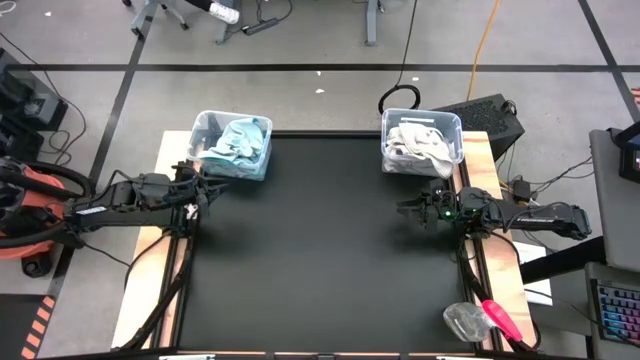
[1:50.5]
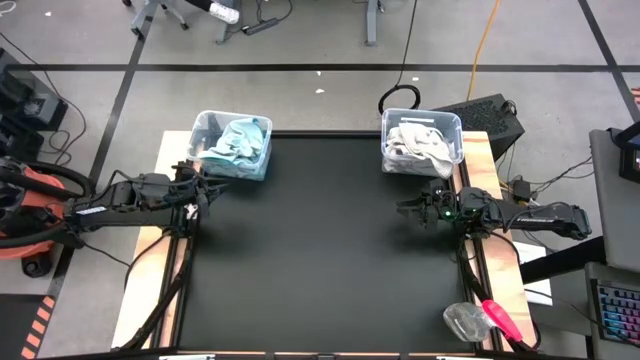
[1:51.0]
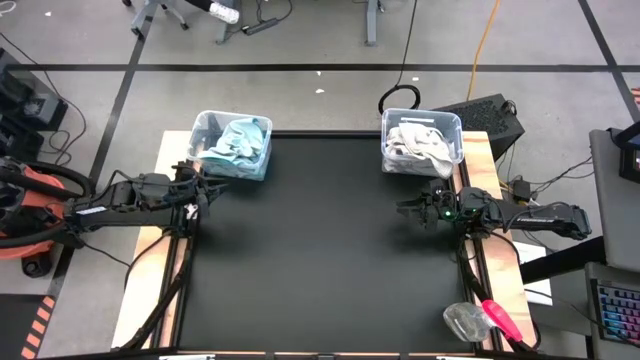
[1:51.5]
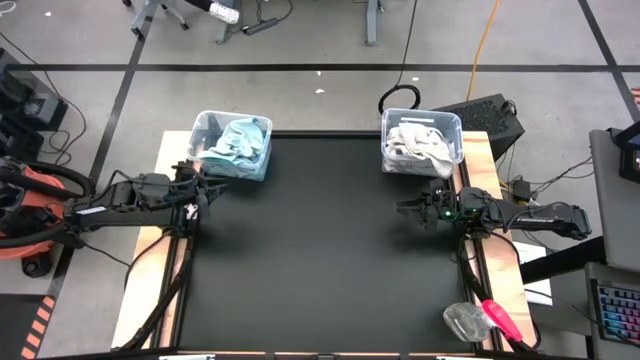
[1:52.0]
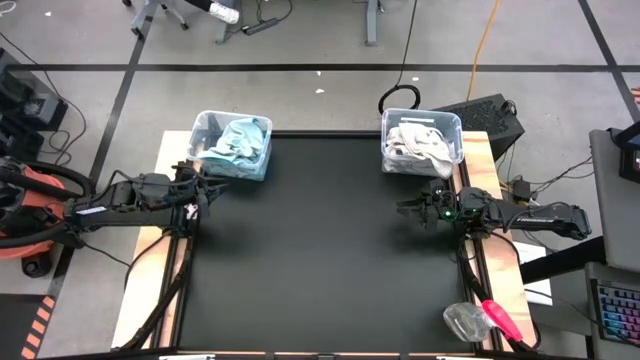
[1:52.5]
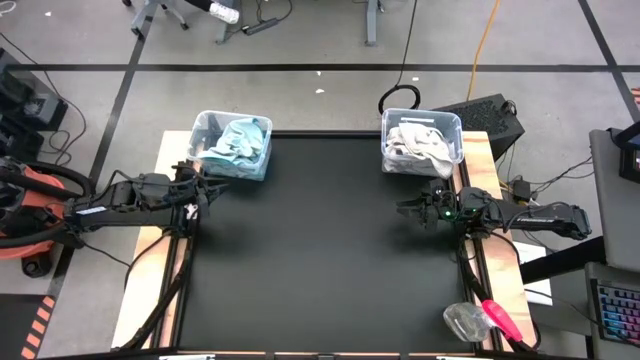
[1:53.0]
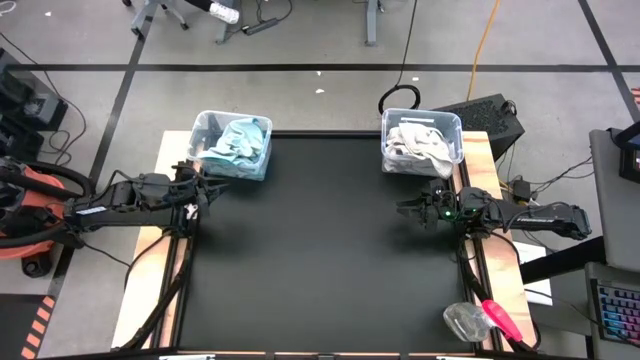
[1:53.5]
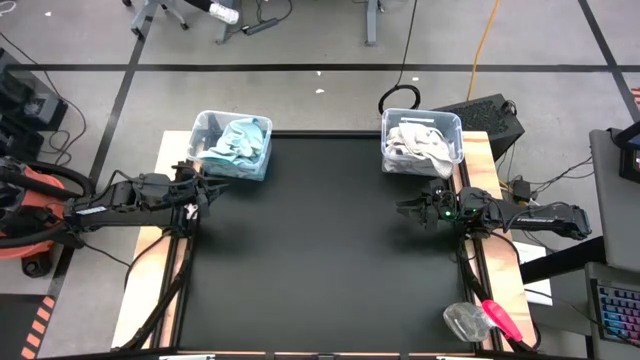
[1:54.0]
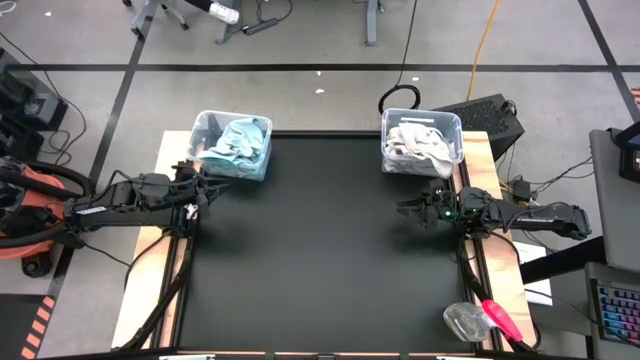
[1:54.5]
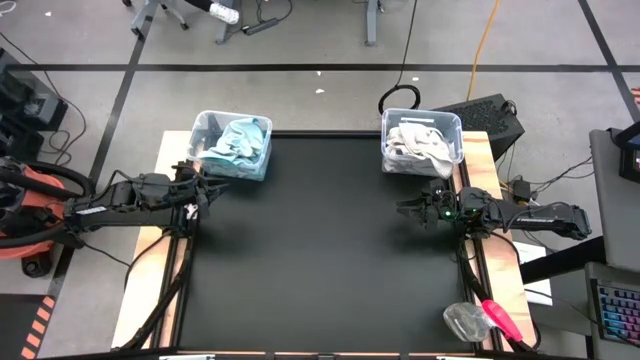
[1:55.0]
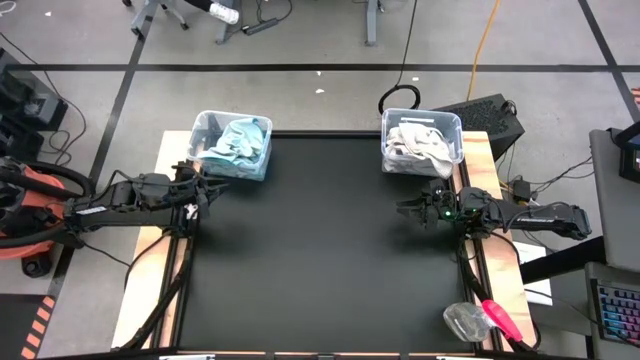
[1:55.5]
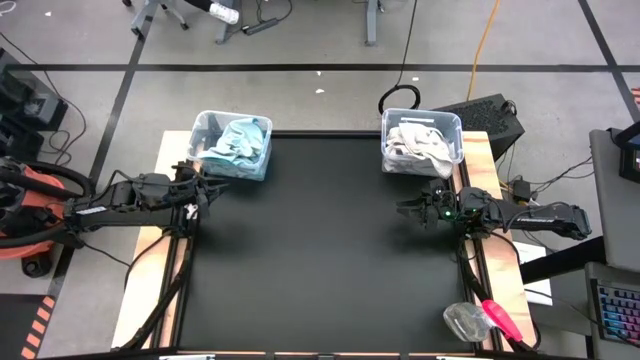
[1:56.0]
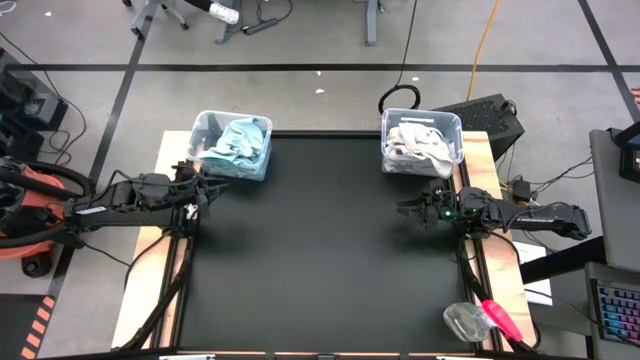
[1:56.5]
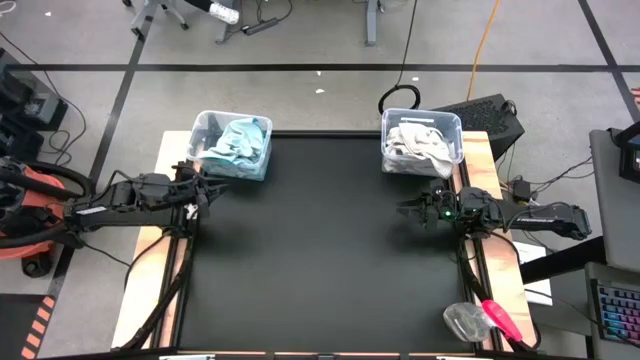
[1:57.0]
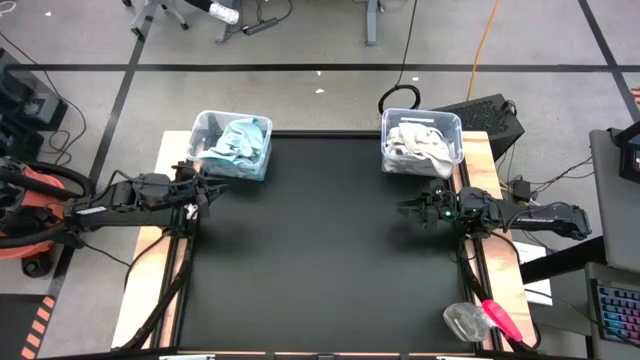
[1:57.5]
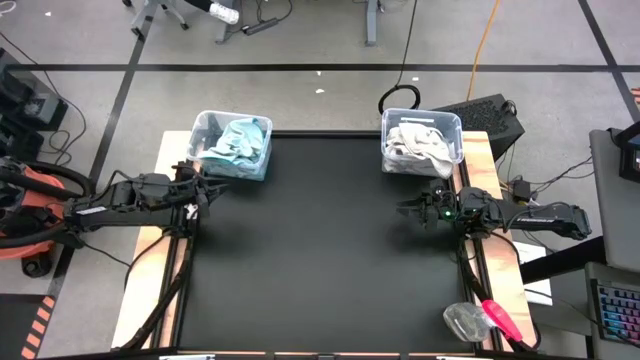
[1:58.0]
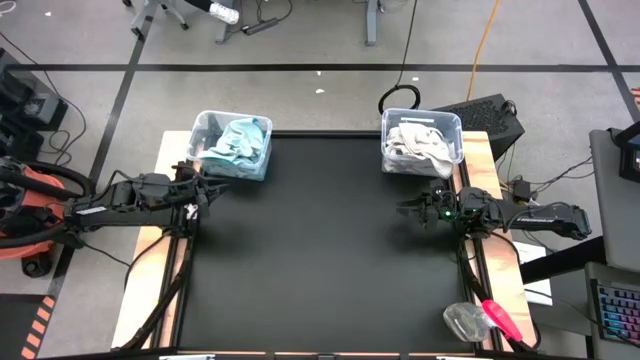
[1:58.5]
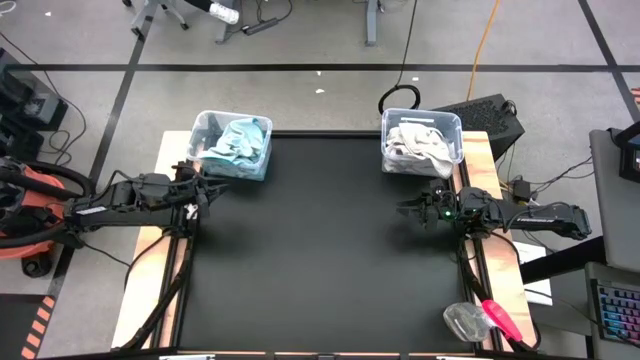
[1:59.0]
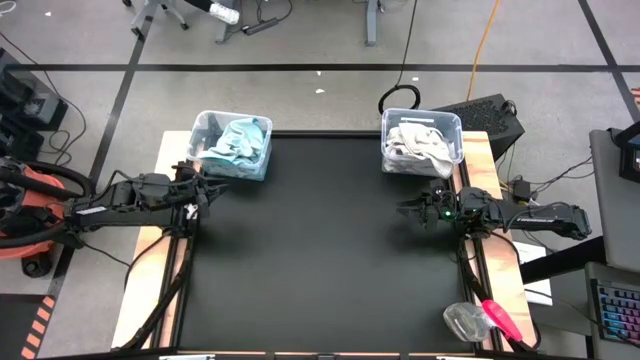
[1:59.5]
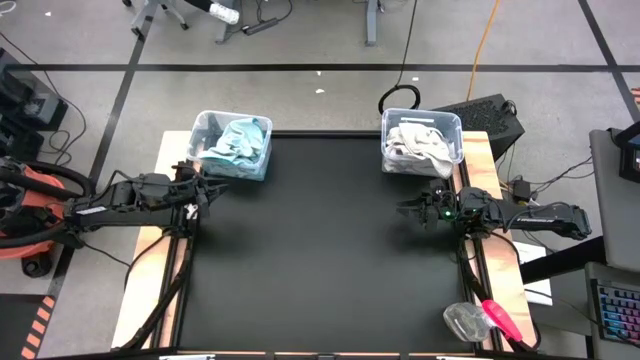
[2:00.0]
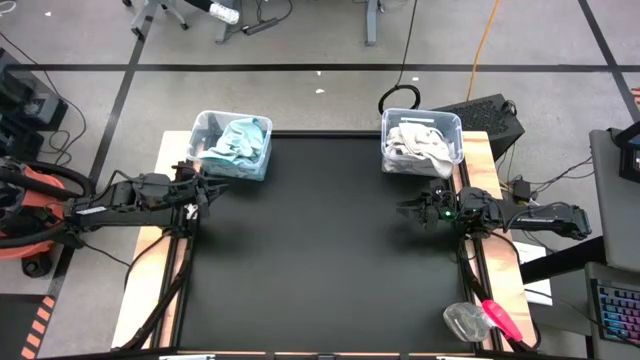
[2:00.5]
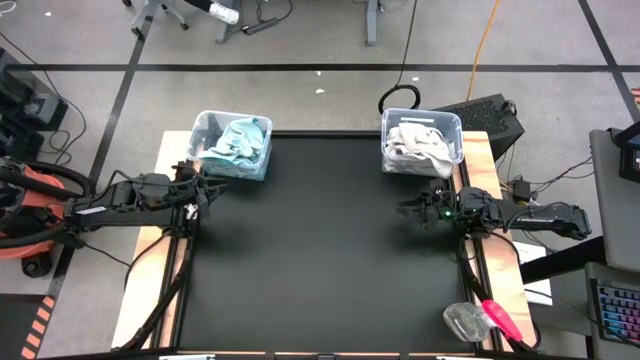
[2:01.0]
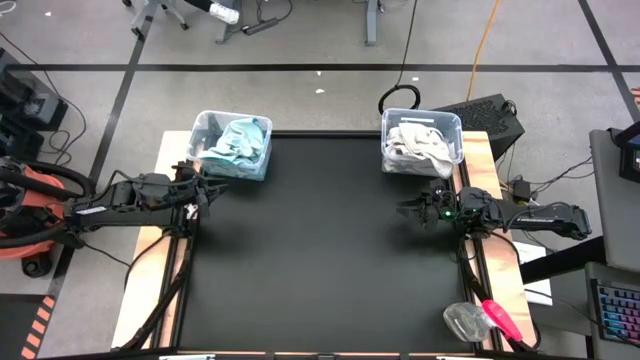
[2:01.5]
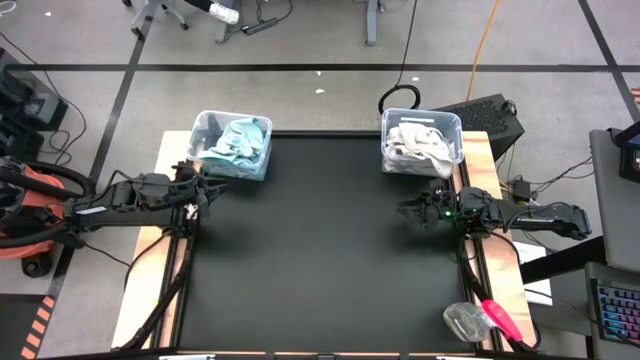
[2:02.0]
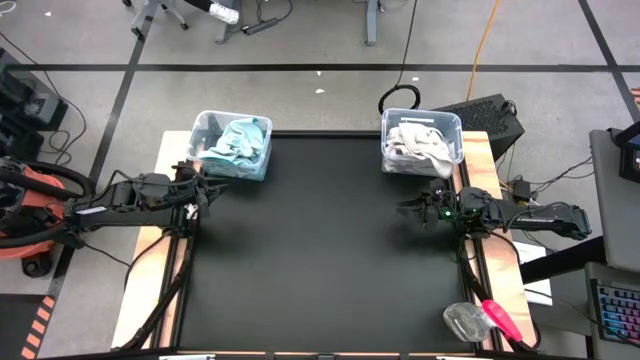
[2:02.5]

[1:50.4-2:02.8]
Task: Sort microfiber towel by color & place in baskets
Return to Home Position

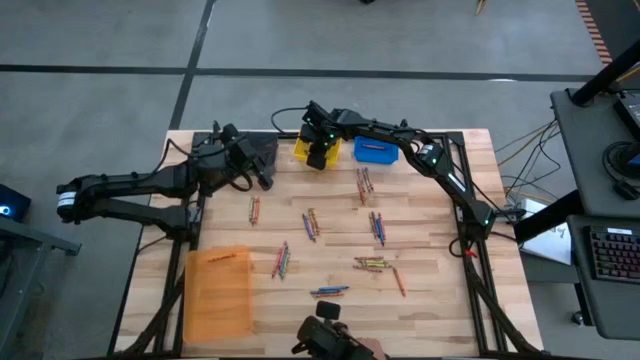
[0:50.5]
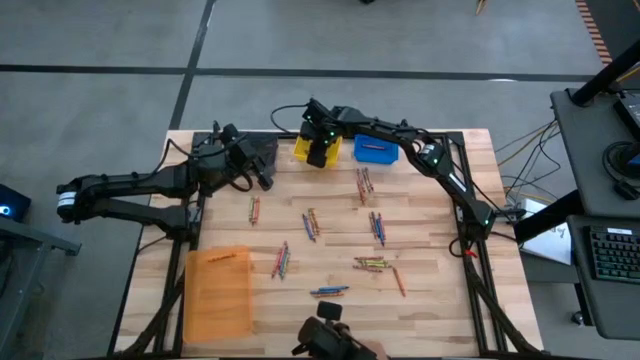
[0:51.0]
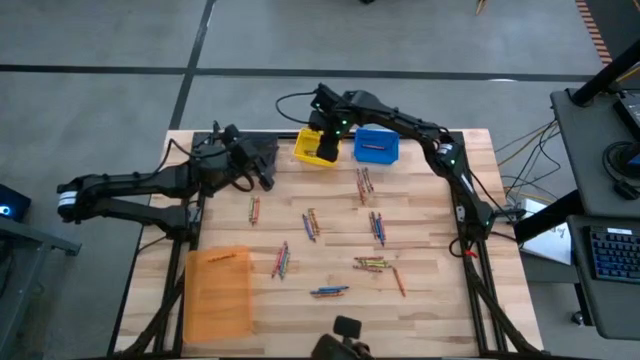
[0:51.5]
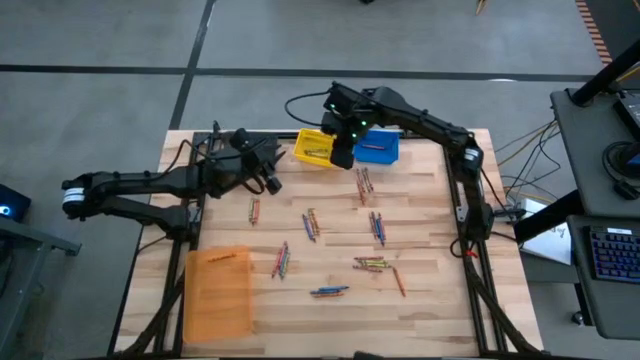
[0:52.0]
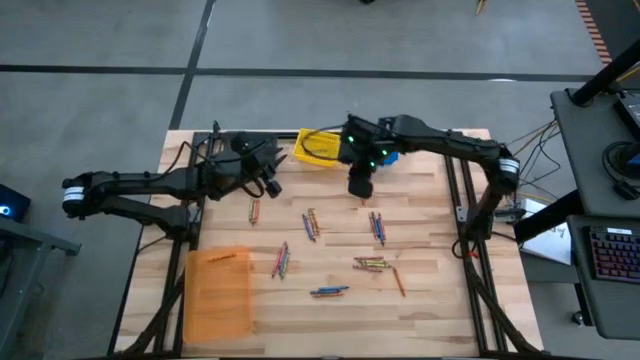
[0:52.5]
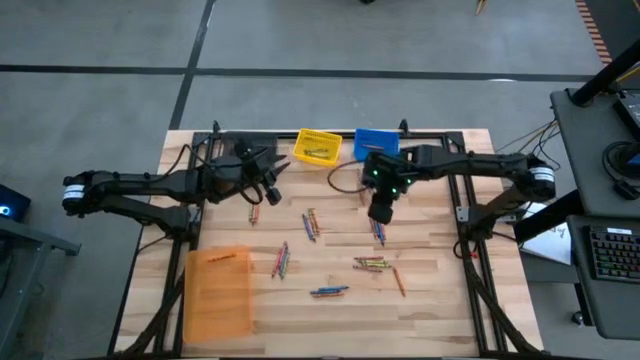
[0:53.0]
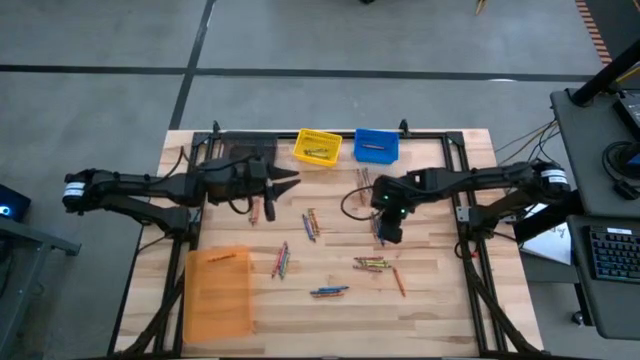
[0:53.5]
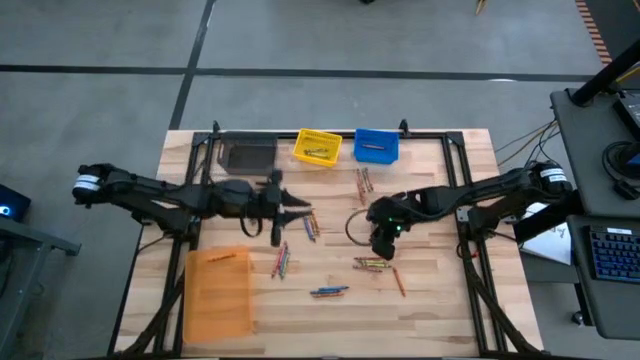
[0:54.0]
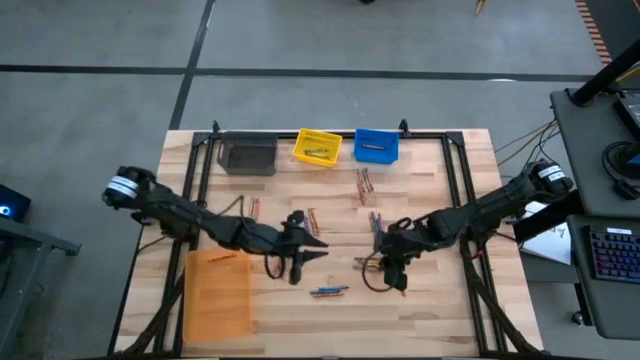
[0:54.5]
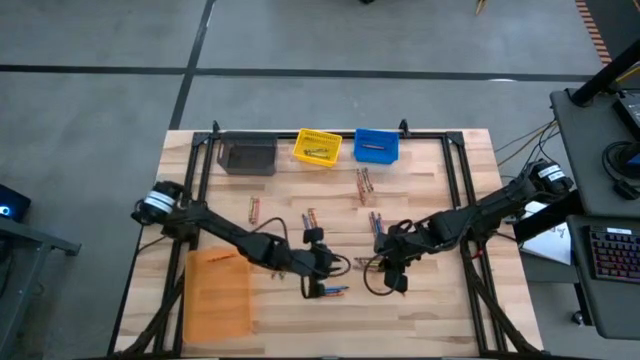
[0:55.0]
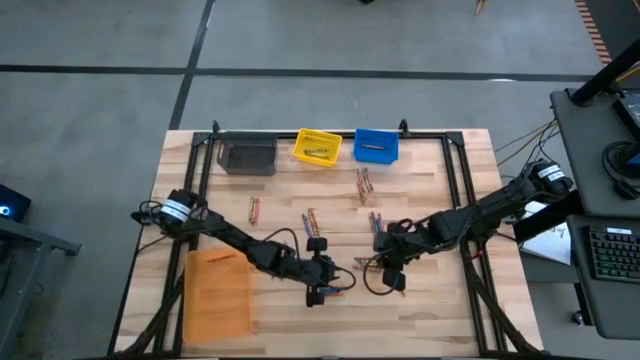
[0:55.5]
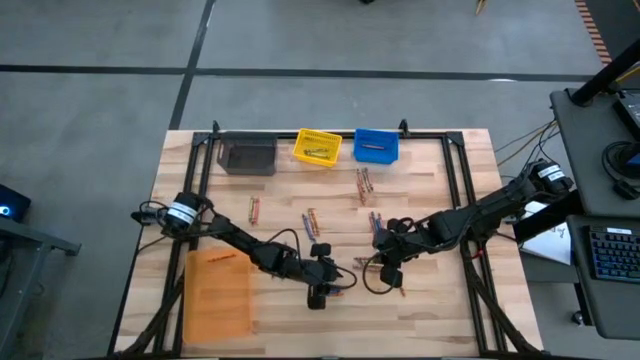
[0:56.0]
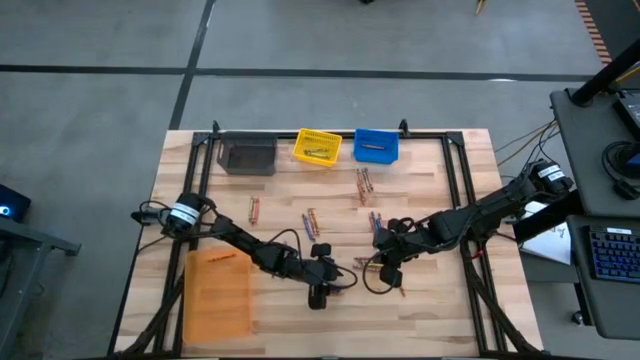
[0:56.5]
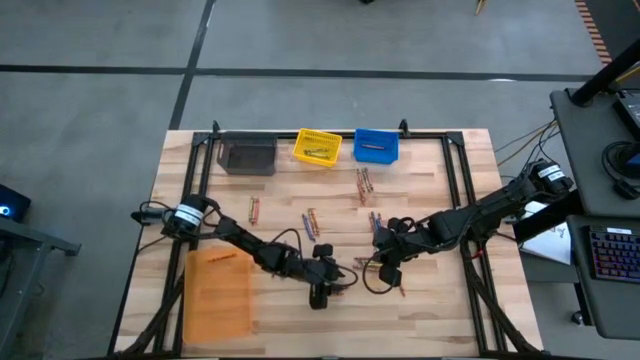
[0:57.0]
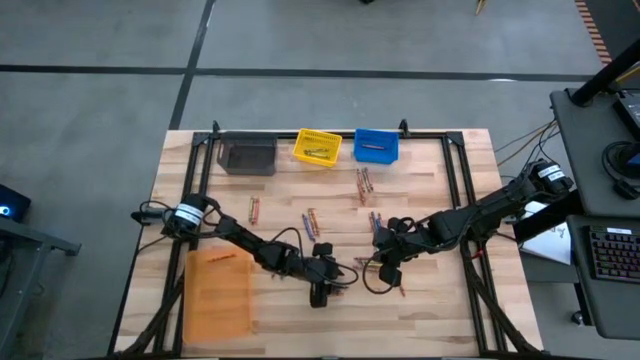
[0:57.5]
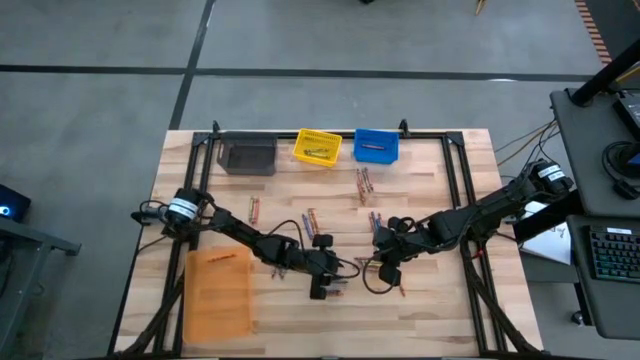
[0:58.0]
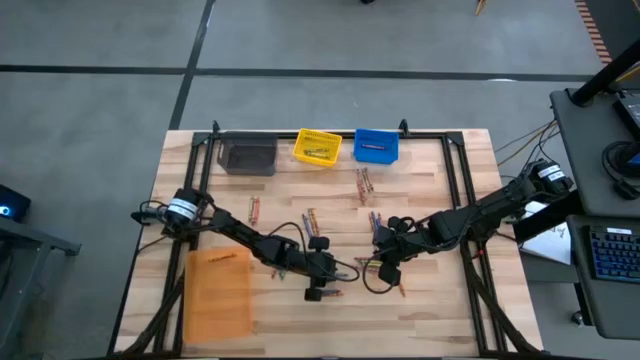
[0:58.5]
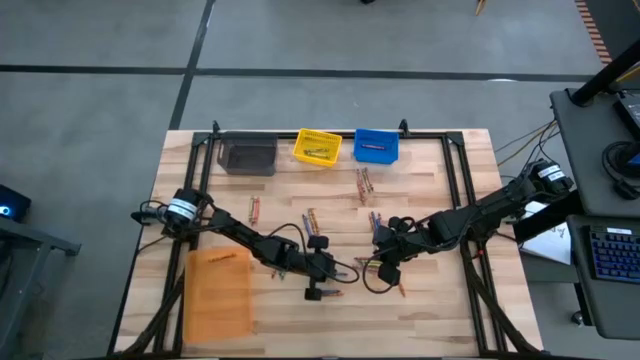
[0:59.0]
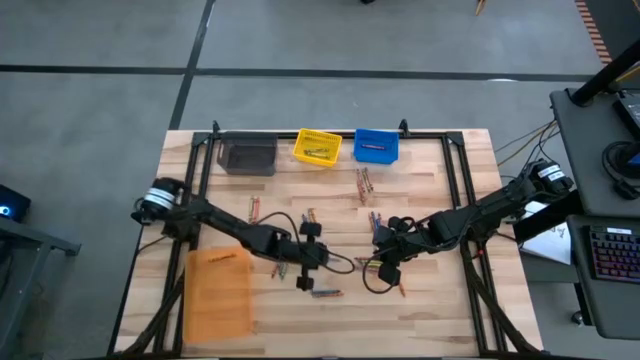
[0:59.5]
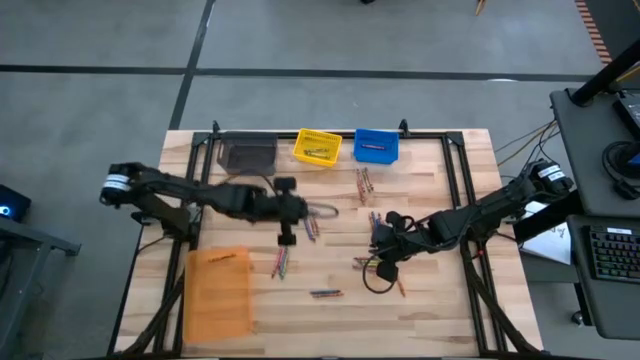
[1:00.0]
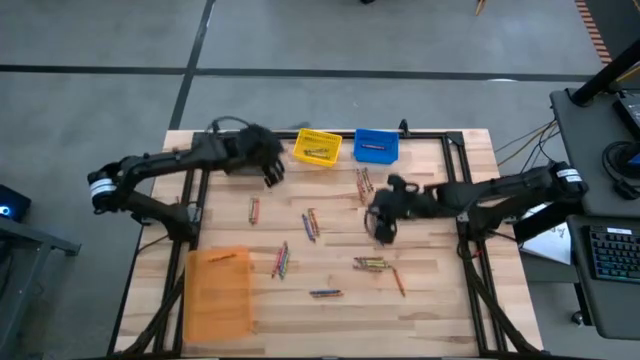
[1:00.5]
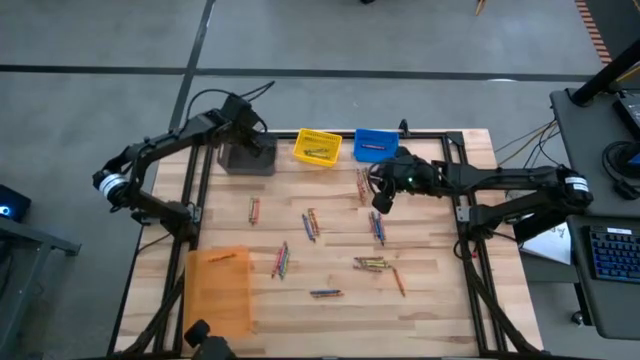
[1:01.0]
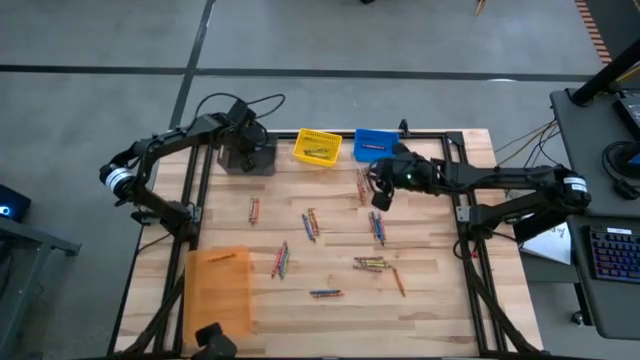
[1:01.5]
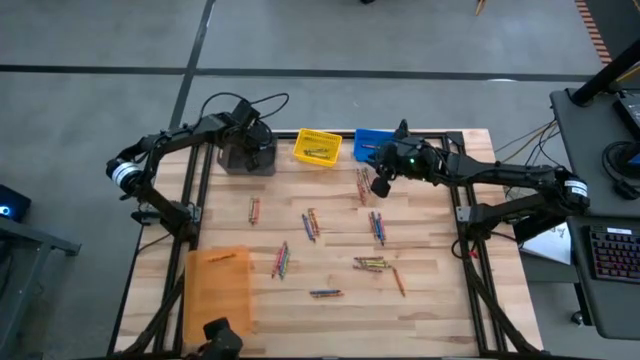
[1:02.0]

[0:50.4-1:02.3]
Task: Sort crayons
Put the blue crayon into the black bin
